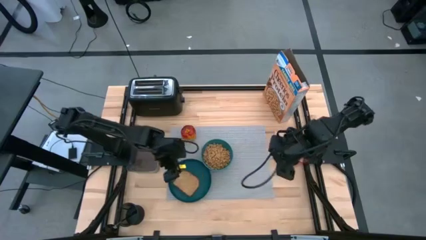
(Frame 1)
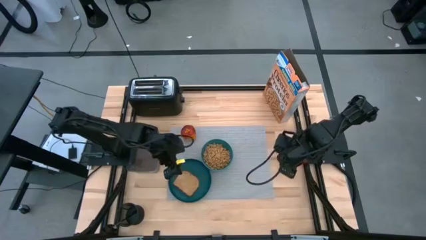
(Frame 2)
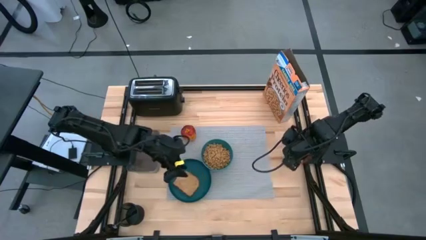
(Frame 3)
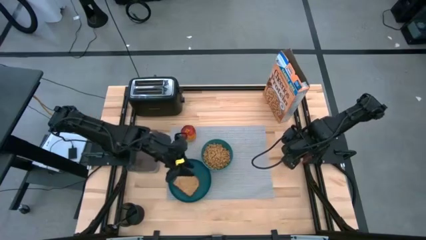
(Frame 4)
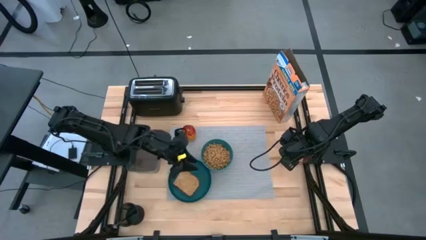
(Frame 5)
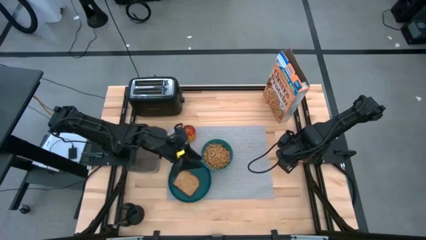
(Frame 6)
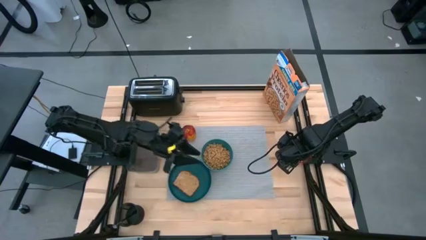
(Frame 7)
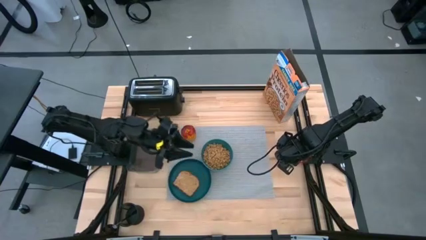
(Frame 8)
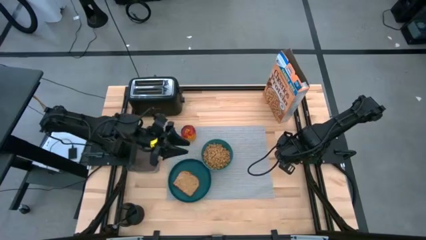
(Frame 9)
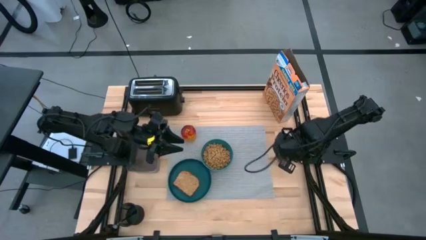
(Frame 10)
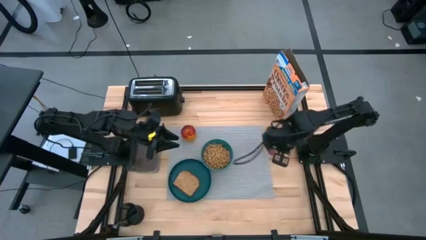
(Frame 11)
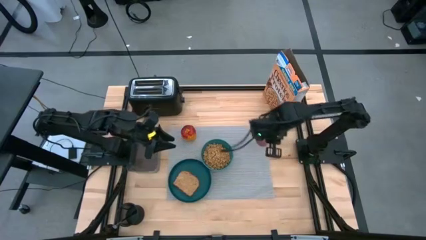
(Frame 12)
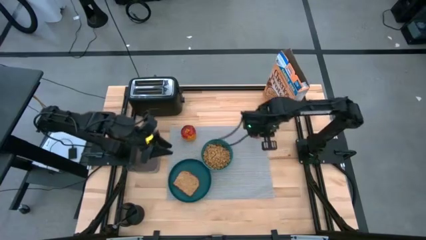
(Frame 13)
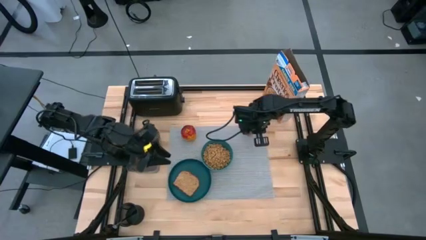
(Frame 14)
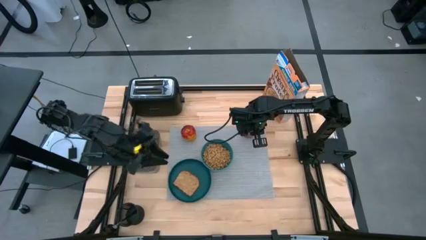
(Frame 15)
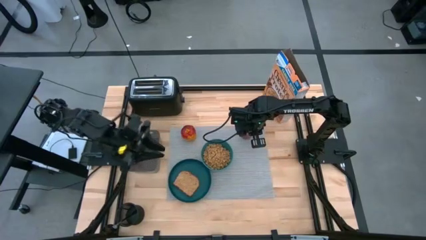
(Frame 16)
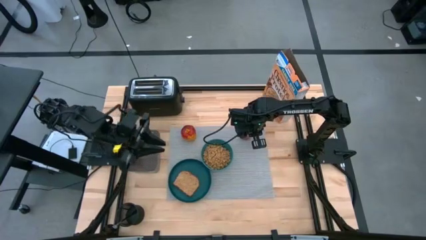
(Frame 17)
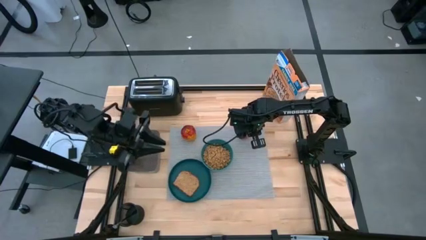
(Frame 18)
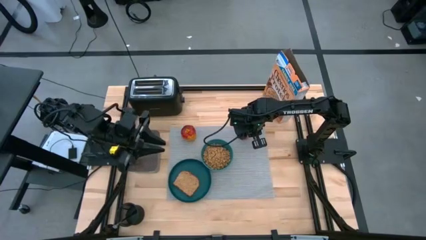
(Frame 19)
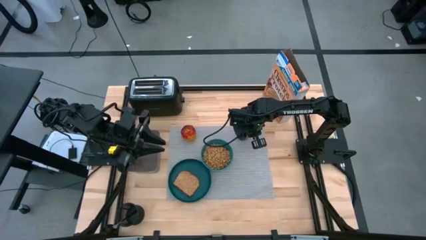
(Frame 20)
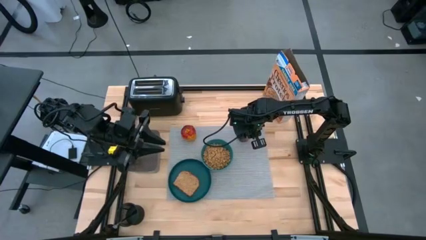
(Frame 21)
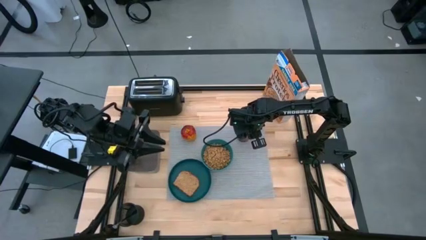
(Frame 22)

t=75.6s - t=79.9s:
Task: Arrange a breakfast setting
Put the red cup on the mat

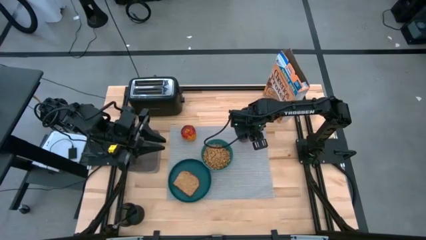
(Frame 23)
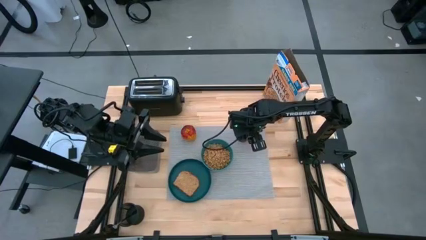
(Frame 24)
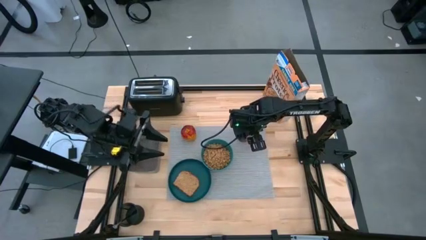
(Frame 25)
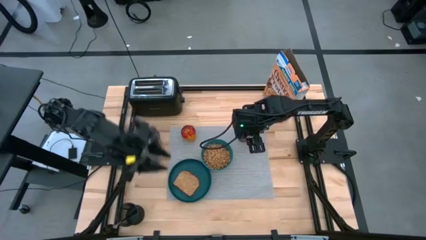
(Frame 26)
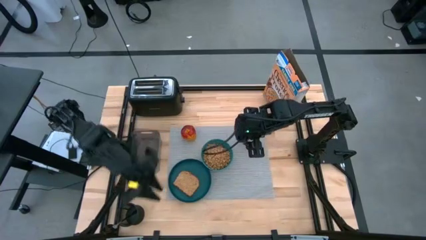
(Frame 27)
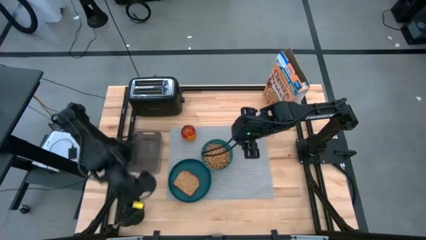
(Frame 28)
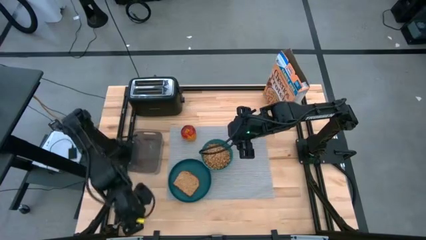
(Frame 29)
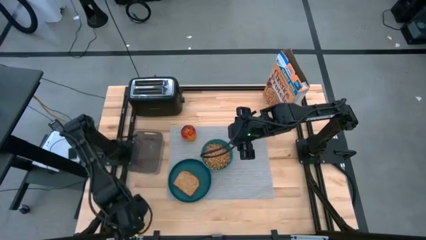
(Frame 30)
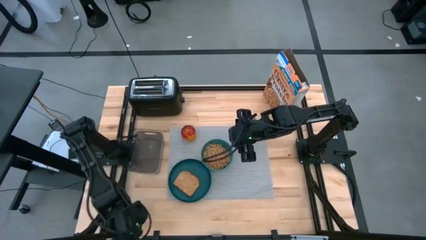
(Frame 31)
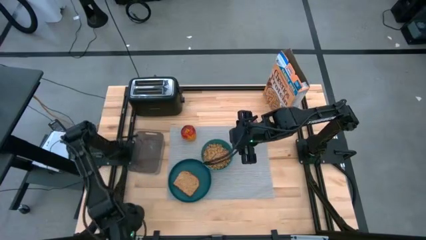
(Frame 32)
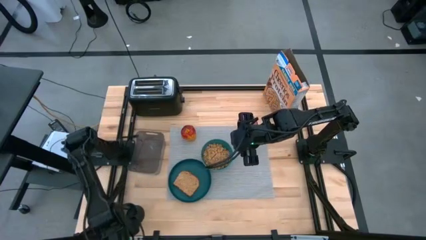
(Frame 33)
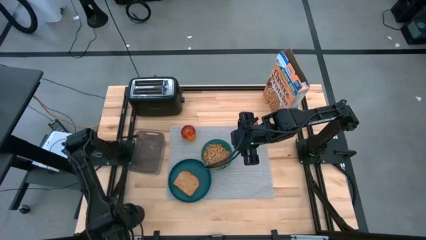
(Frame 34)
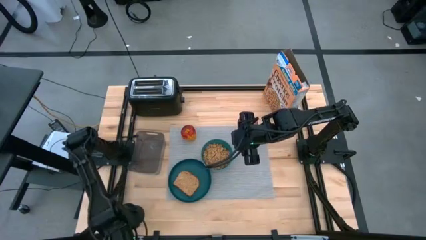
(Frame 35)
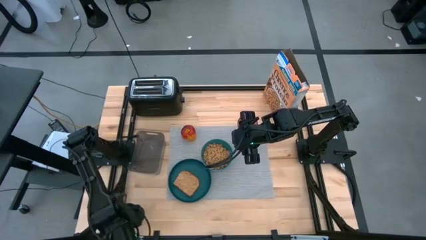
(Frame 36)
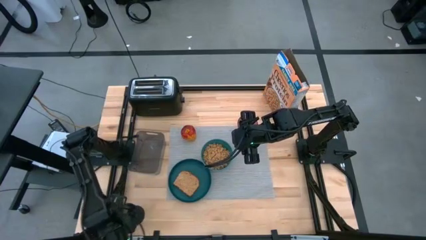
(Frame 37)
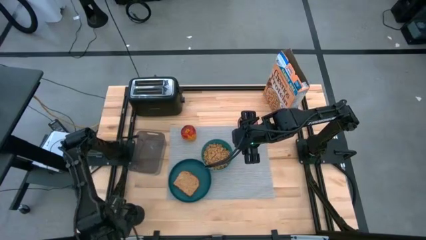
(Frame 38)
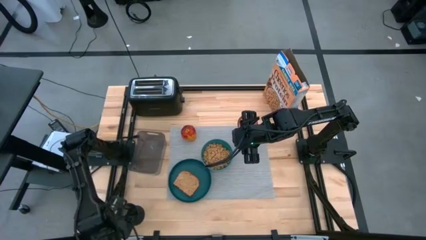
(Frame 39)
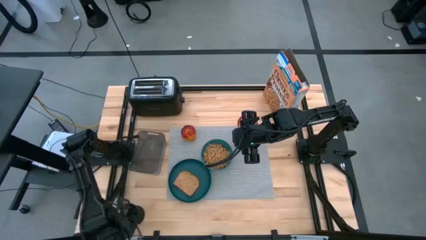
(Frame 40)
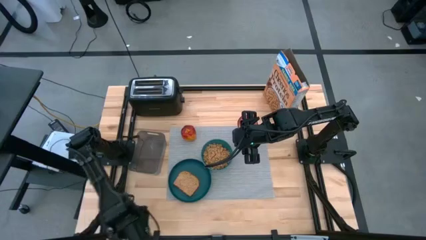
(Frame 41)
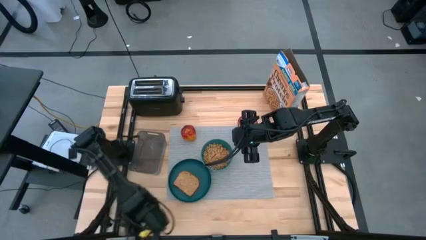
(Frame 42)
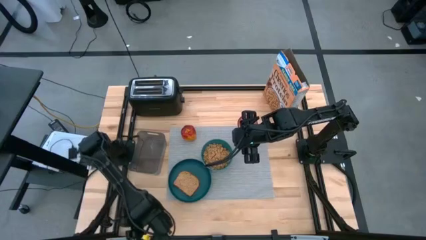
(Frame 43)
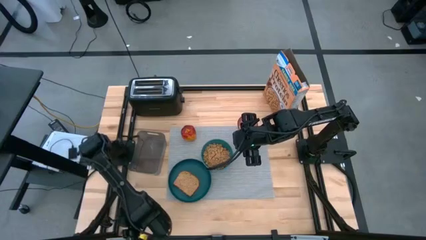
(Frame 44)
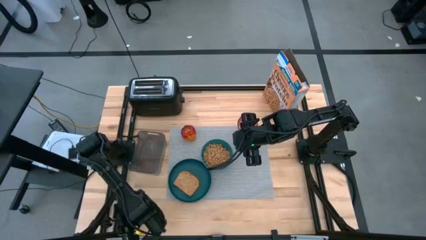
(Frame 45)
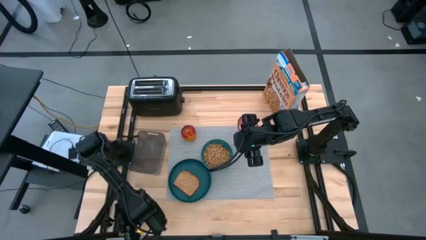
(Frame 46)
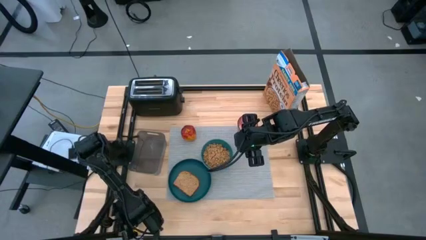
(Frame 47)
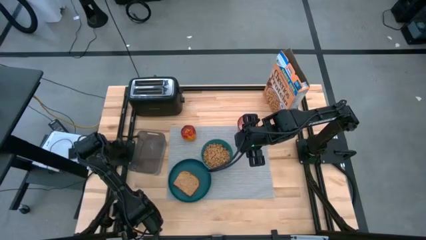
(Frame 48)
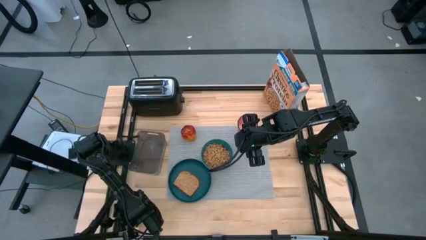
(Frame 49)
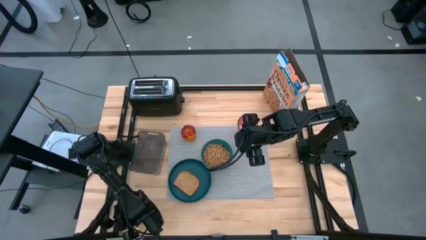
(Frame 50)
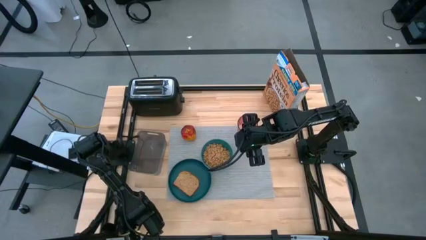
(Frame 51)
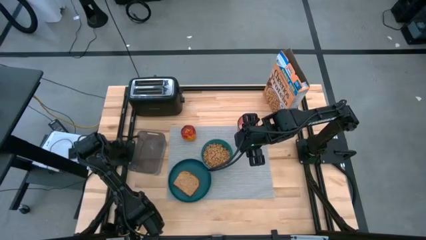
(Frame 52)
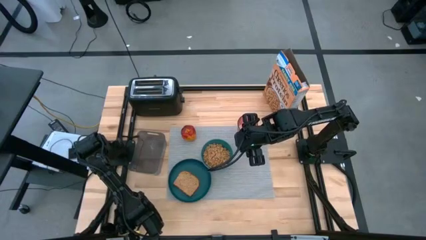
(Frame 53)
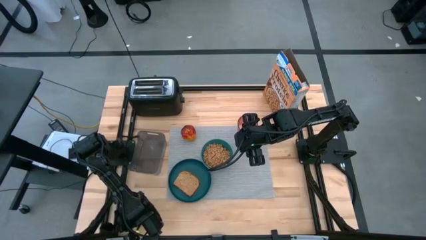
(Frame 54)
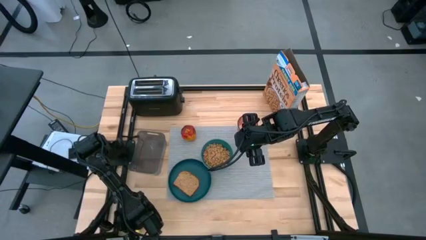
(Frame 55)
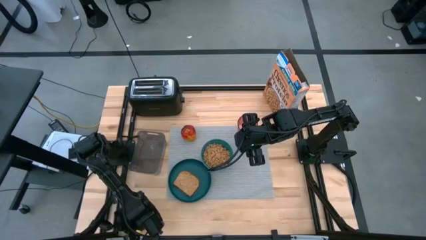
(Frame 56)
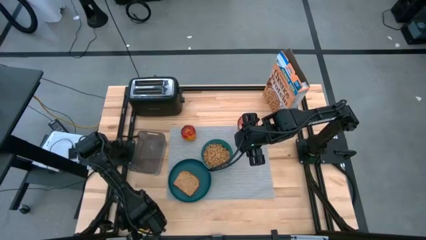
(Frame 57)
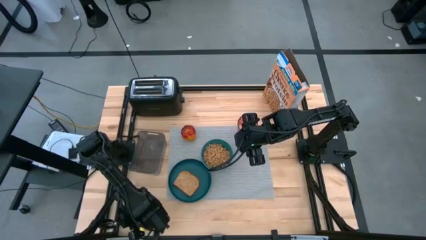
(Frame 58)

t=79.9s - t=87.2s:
Put the spoon on the mat

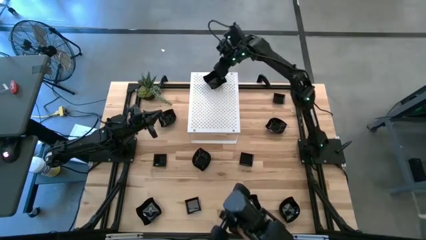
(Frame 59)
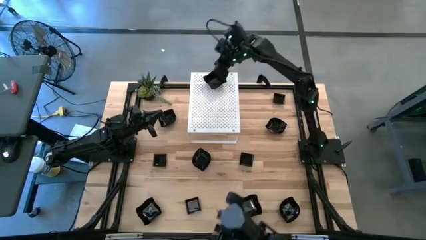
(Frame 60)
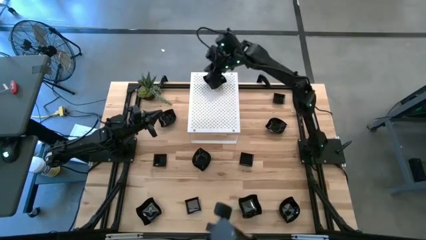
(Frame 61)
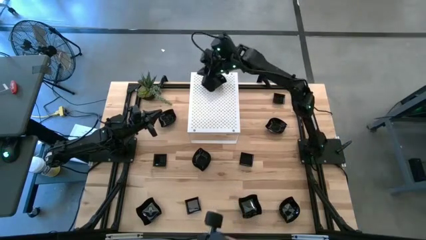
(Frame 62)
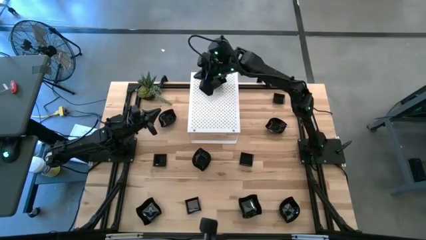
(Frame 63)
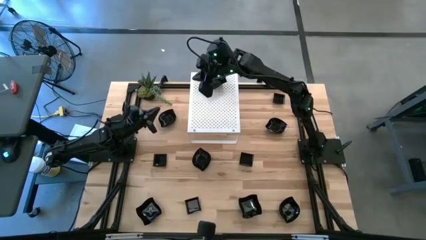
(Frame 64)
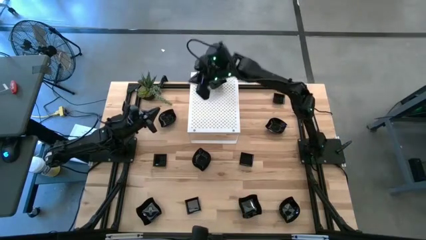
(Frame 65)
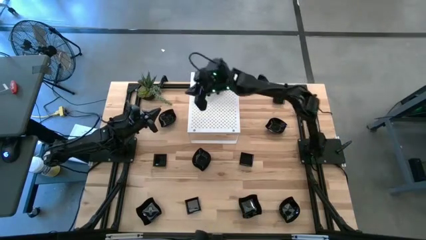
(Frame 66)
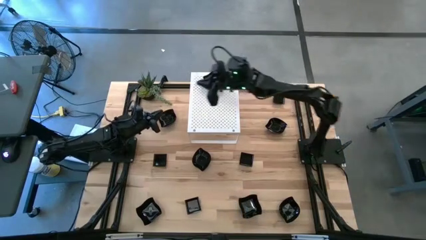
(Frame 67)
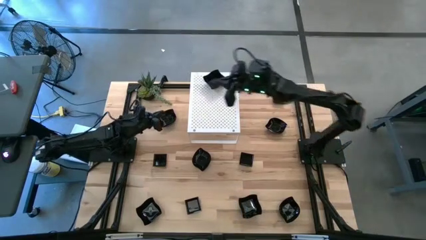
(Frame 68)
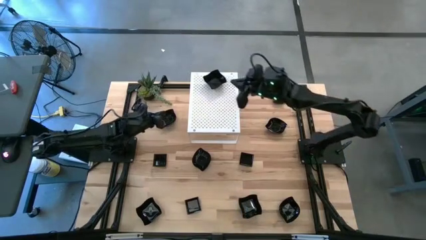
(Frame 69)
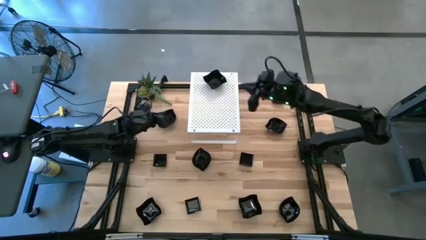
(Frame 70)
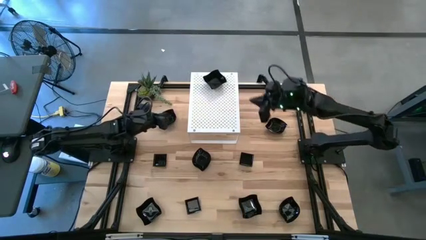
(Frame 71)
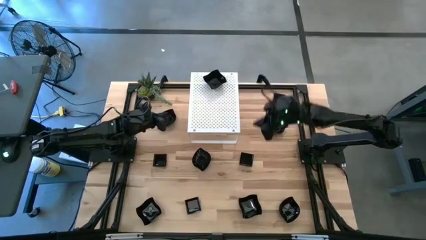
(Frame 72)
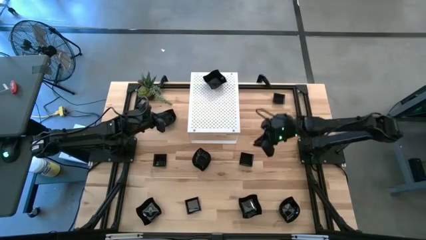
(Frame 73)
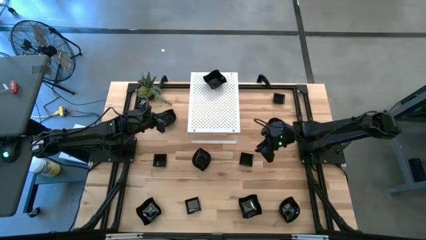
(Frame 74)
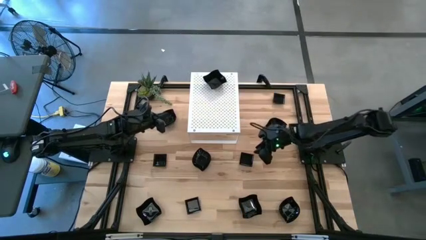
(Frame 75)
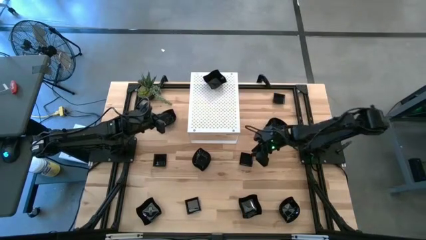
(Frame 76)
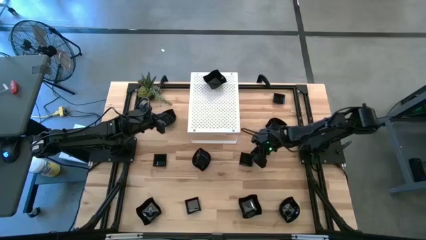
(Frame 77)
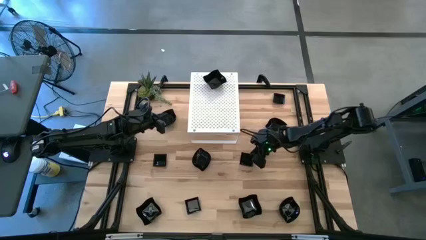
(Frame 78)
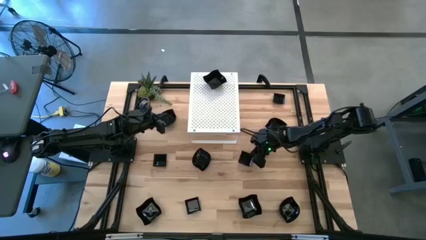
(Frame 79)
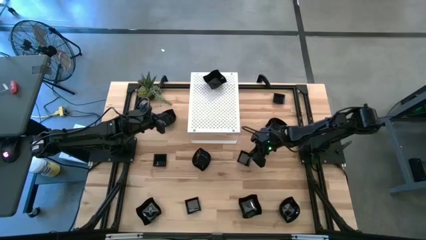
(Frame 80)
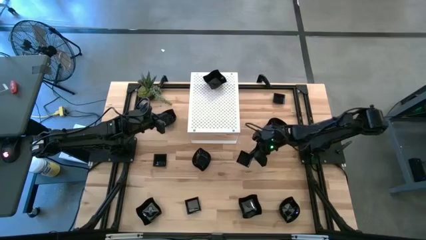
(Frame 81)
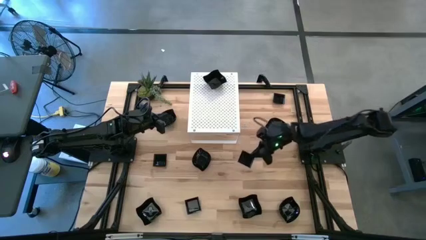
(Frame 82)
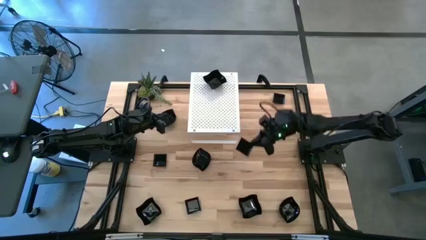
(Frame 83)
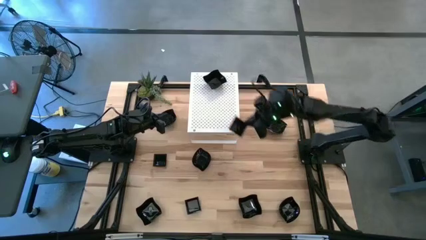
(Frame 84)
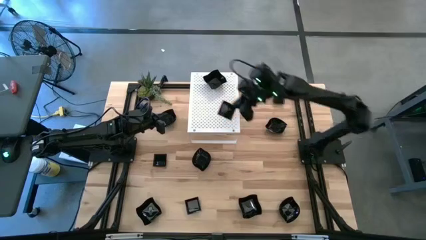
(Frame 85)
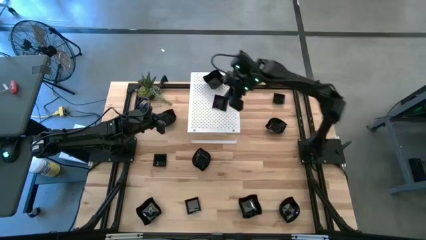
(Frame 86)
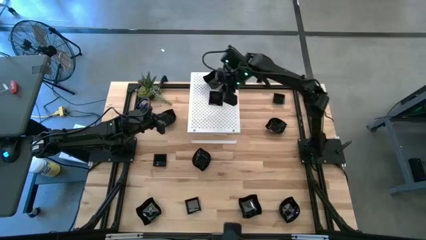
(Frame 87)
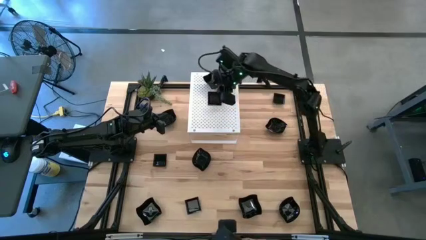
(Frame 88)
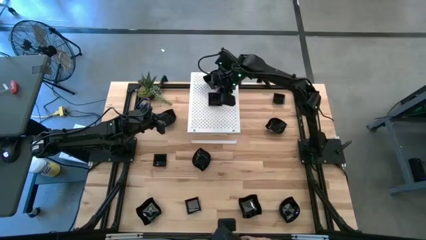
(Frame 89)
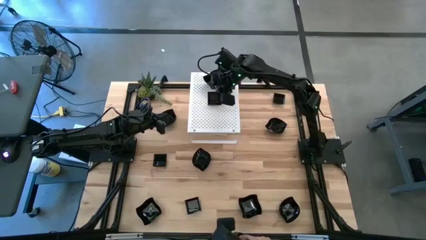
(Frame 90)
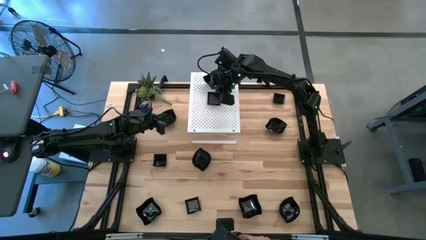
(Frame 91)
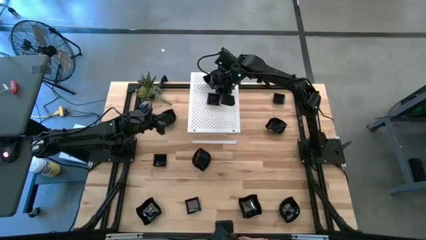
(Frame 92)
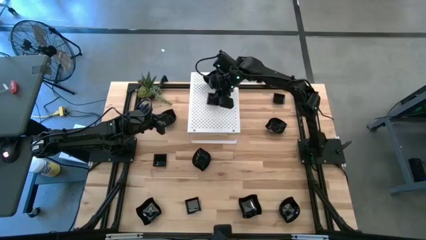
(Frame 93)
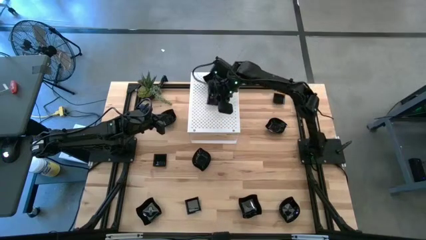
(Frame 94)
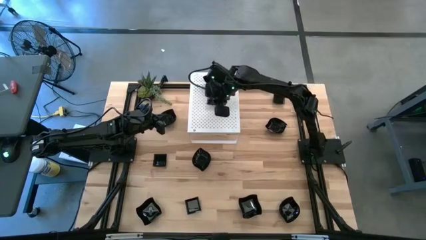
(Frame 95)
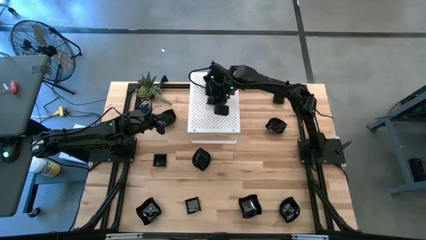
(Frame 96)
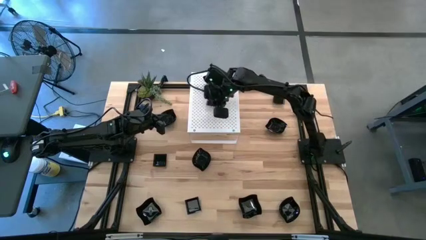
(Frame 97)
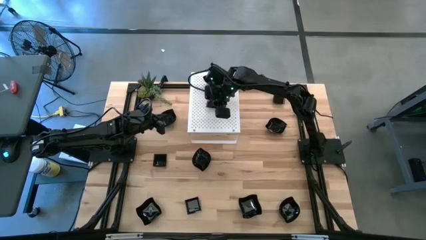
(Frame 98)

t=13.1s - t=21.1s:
Task: Pick & Place Mini shaped plates
Put the black square plate on the shelf
